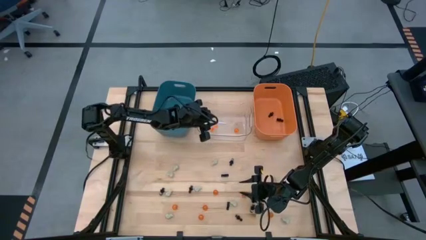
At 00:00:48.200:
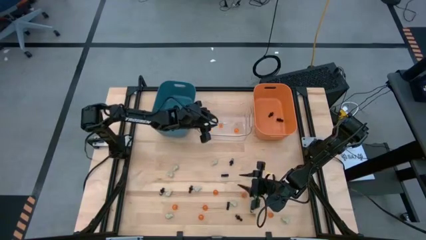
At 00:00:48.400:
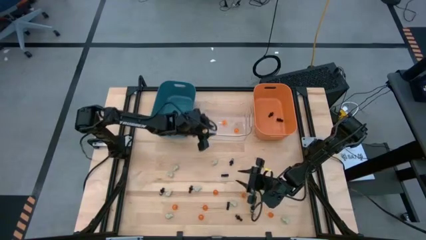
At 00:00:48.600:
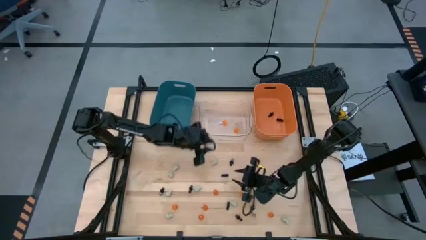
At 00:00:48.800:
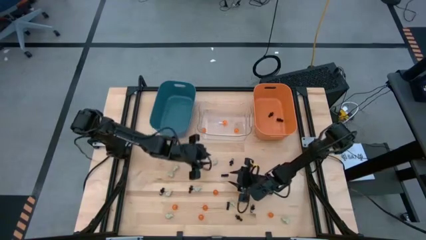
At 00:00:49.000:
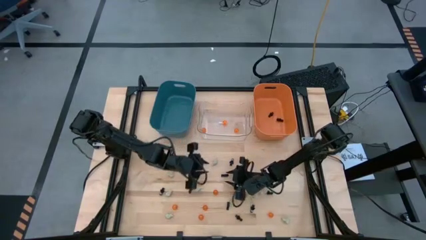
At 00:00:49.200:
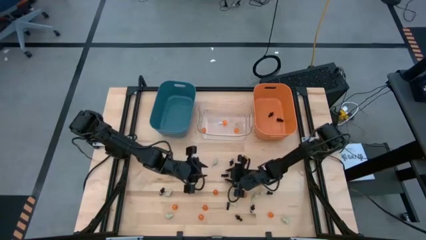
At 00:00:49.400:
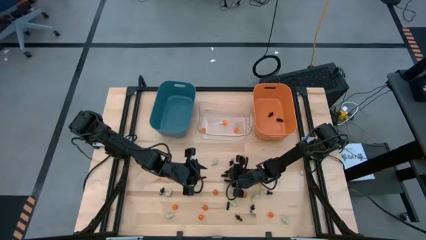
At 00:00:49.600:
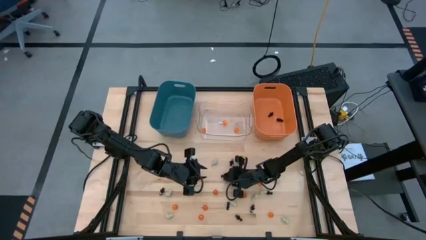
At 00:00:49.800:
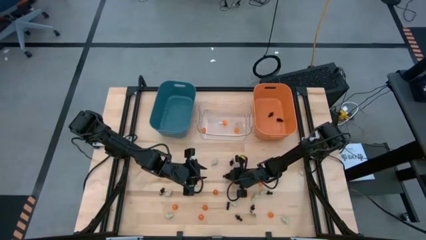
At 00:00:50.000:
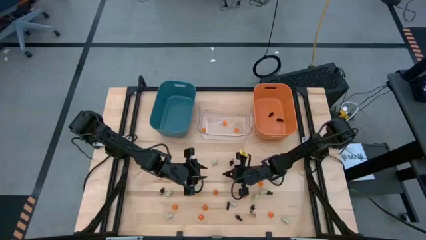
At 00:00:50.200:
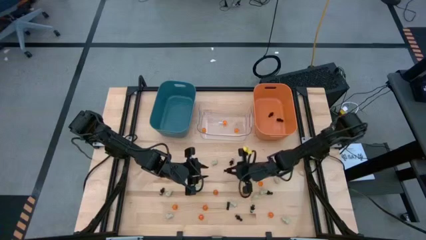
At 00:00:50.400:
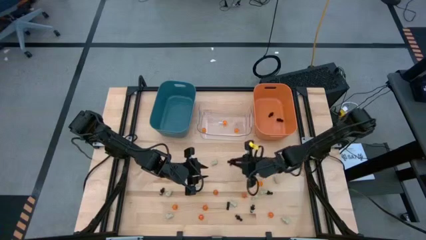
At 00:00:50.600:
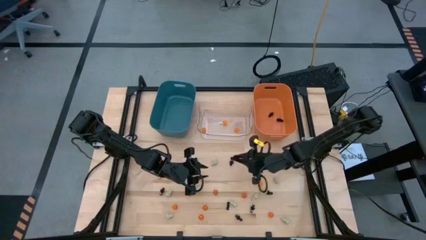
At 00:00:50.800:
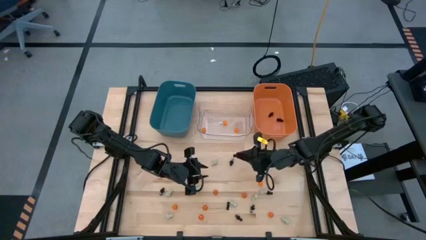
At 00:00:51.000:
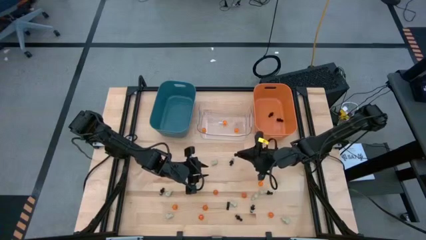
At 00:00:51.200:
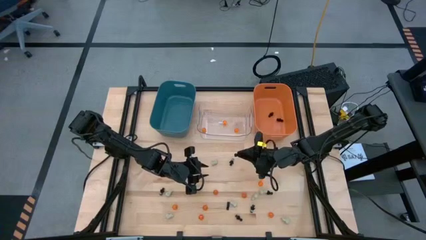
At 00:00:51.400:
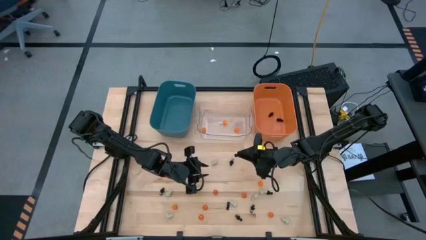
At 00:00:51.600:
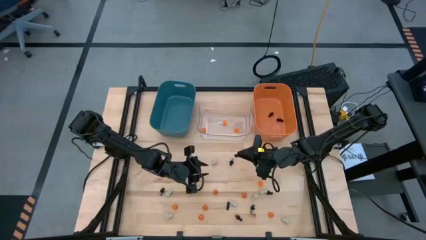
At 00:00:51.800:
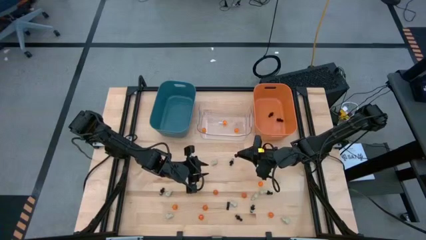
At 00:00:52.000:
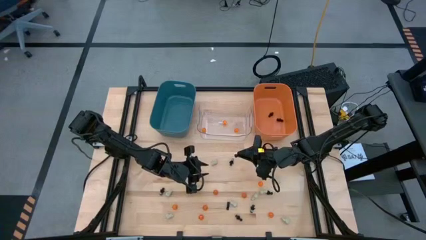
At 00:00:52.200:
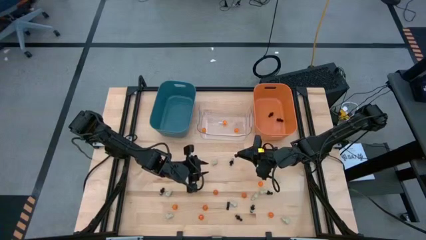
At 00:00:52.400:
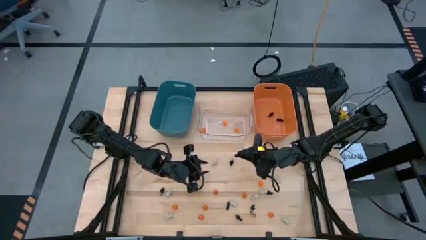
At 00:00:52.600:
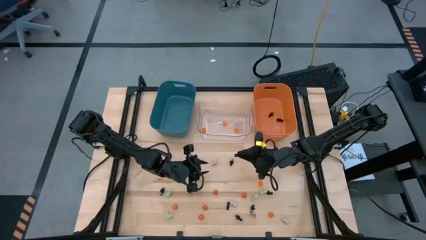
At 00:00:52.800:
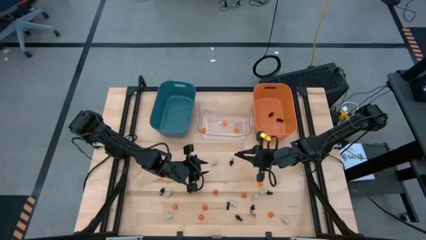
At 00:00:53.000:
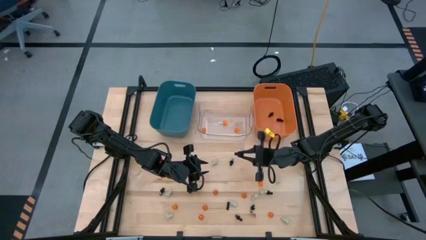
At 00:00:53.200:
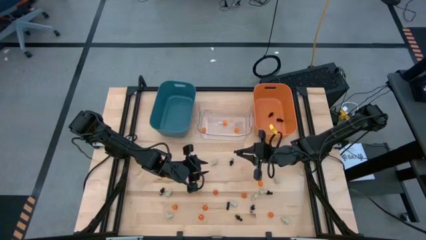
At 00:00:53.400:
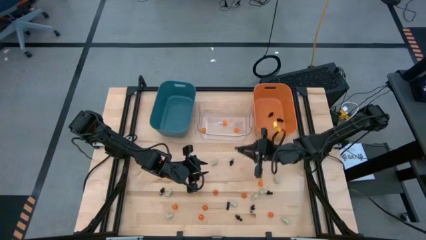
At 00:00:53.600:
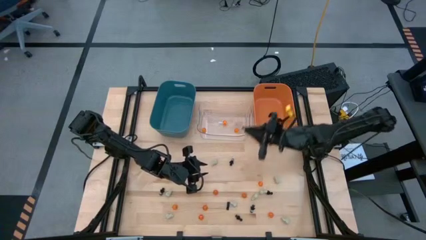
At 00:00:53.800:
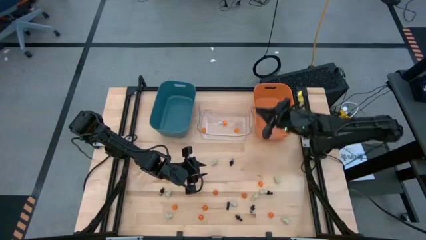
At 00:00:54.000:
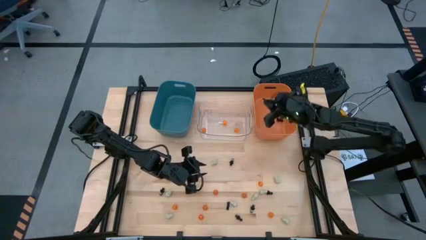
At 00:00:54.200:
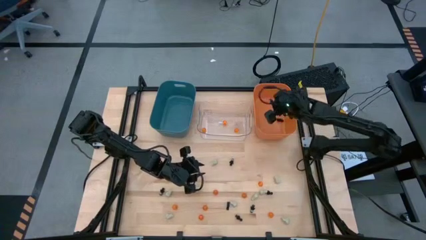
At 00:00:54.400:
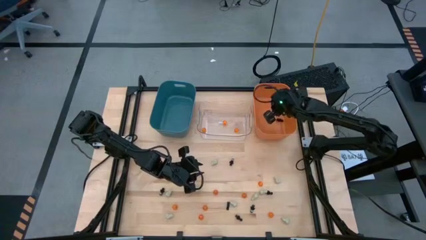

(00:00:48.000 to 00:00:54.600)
Task: Sort Halloween decoration
Put the black skeleton toy into the orange bin

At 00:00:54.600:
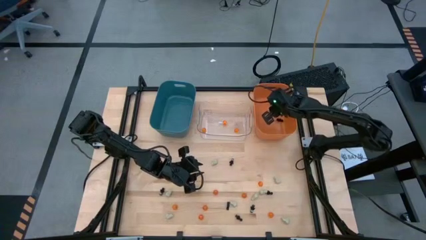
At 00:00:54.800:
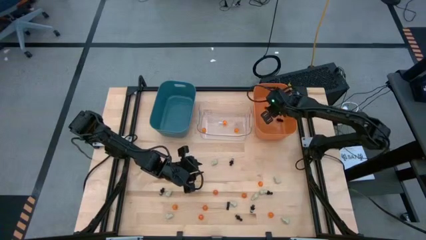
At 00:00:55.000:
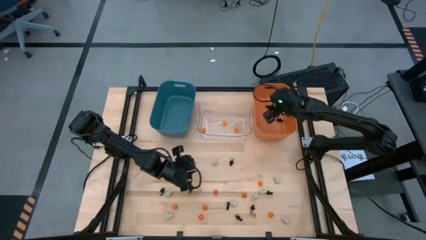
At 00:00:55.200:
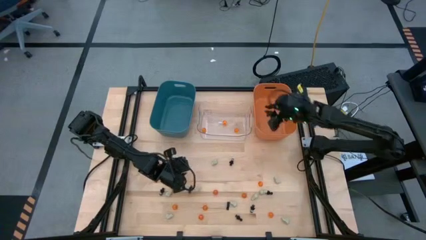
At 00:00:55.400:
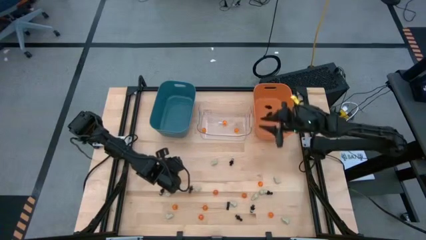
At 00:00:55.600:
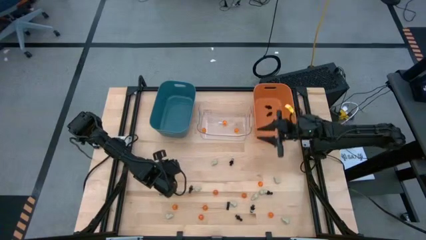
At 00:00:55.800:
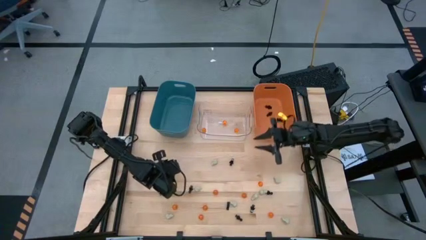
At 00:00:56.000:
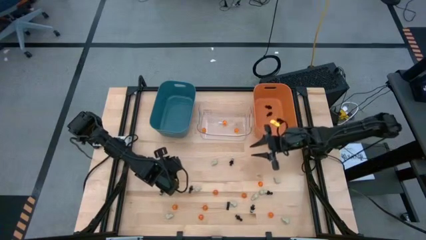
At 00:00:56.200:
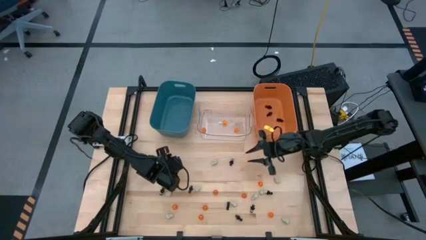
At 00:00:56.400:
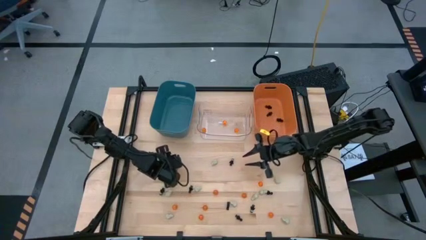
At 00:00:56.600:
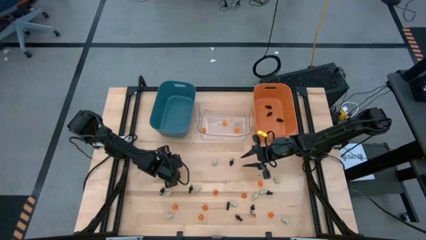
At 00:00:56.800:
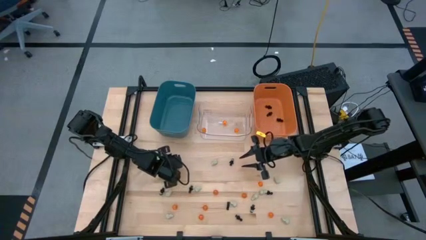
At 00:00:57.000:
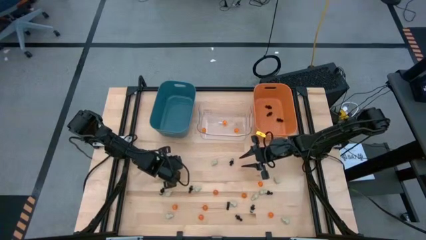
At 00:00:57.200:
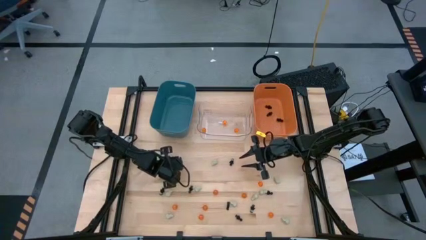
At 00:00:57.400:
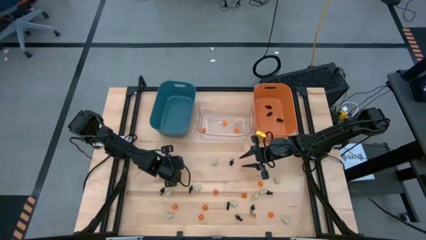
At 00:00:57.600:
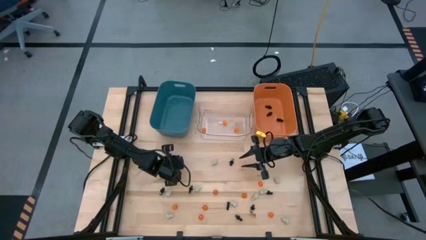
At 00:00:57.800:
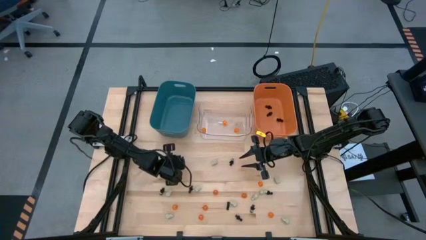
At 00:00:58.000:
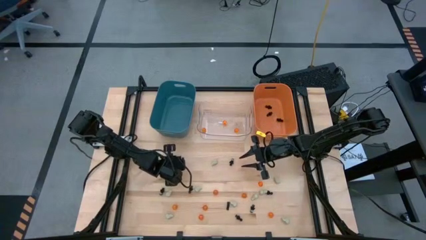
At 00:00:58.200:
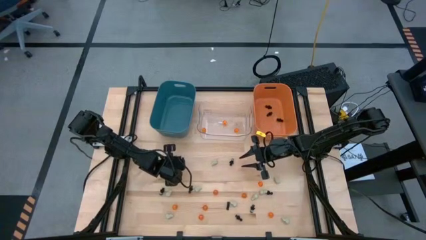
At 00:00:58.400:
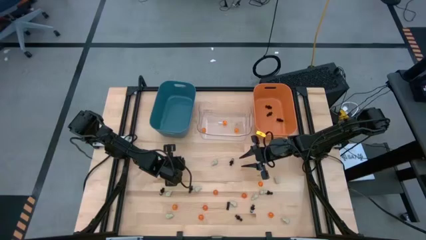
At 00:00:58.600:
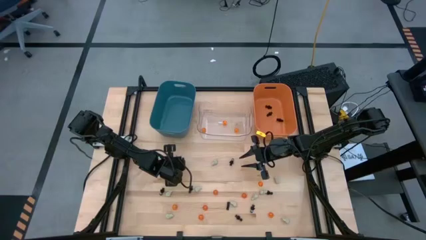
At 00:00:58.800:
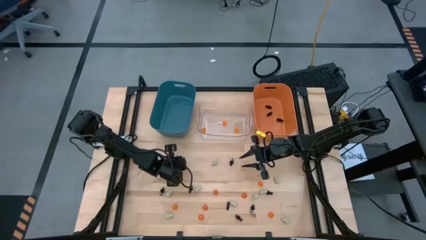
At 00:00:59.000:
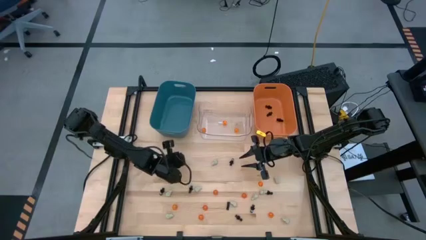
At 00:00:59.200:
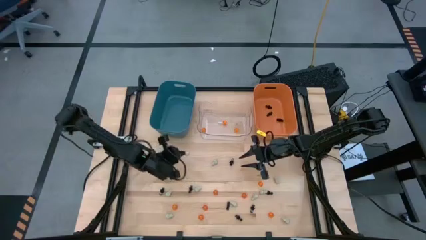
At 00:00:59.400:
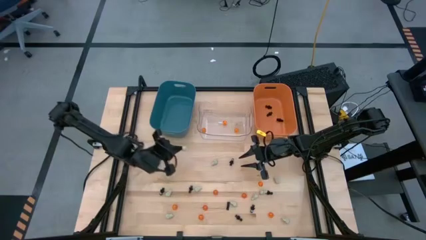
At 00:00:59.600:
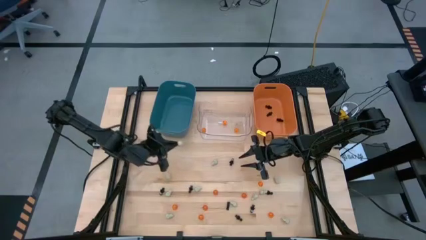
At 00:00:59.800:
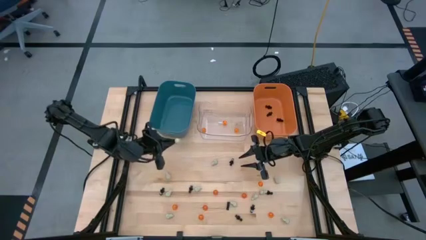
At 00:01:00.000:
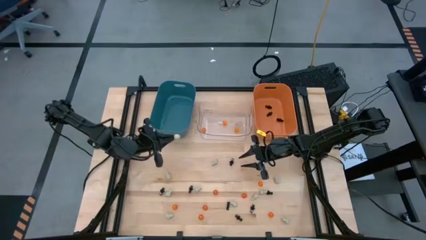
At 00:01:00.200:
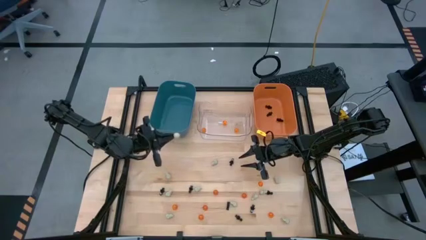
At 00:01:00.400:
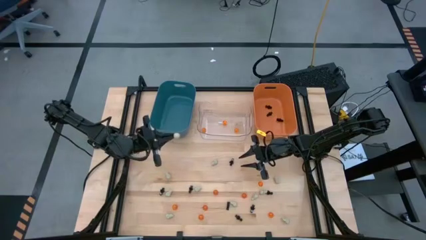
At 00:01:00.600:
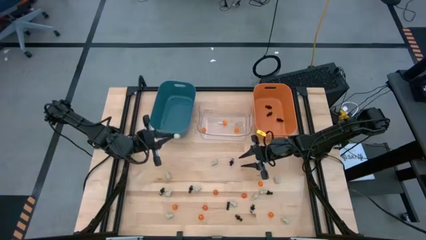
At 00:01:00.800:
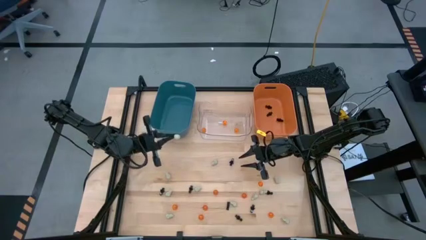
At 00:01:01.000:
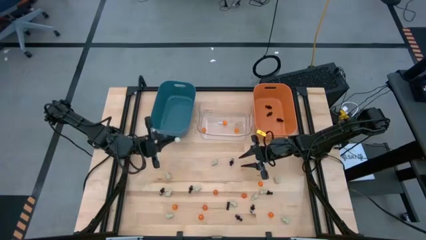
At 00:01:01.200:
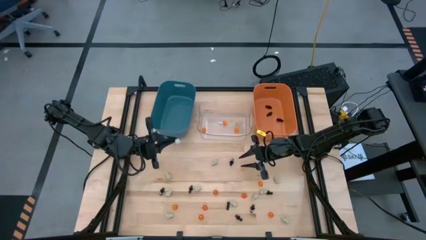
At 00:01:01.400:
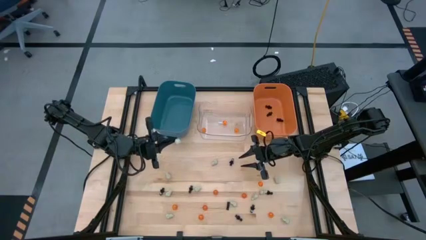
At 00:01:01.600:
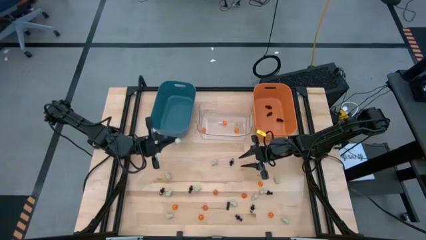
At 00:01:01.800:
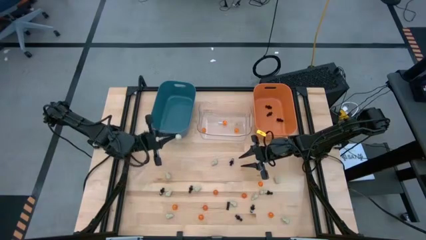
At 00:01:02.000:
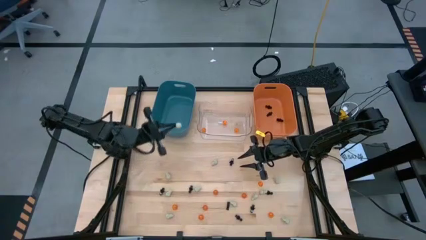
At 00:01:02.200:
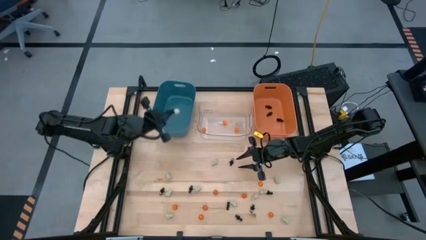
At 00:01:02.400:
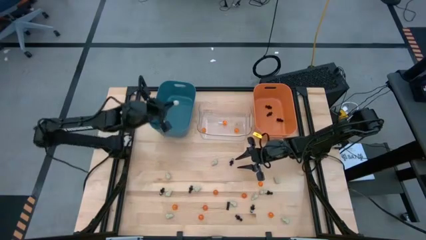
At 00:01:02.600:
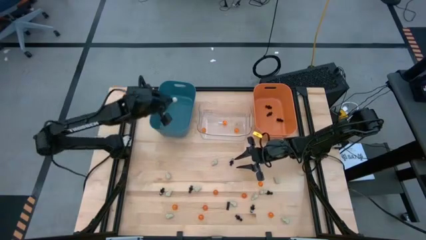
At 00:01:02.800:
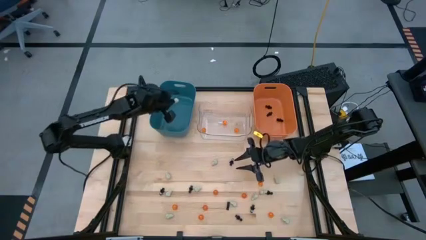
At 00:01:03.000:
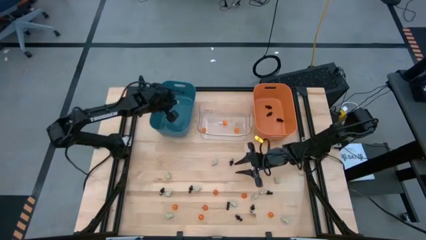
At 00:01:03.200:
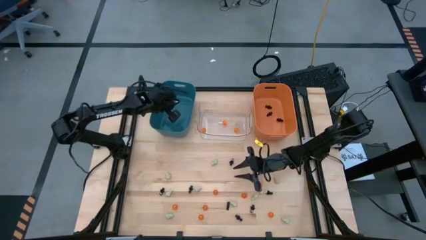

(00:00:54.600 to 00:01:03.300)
Put the white skull toy into the blue bin

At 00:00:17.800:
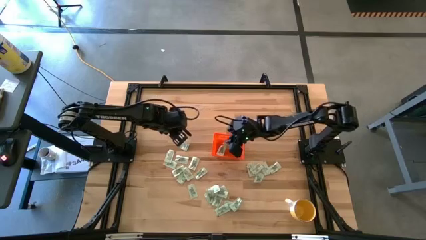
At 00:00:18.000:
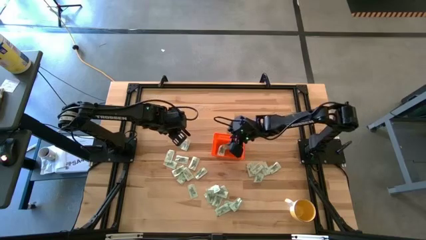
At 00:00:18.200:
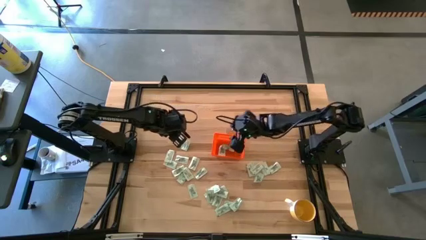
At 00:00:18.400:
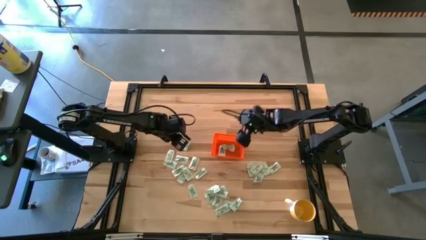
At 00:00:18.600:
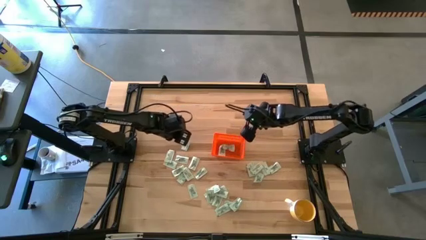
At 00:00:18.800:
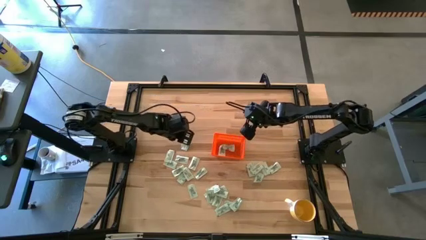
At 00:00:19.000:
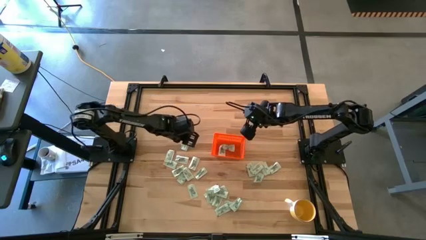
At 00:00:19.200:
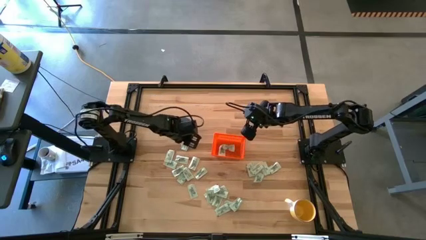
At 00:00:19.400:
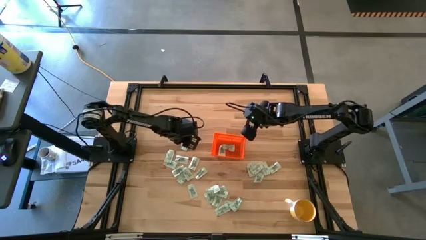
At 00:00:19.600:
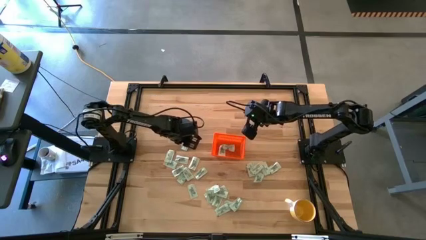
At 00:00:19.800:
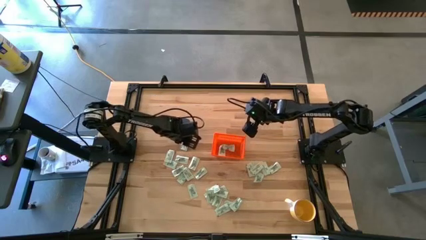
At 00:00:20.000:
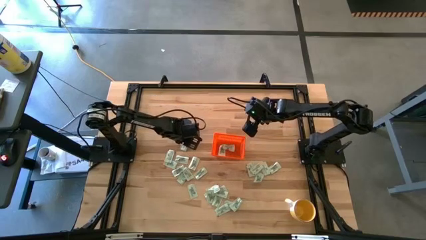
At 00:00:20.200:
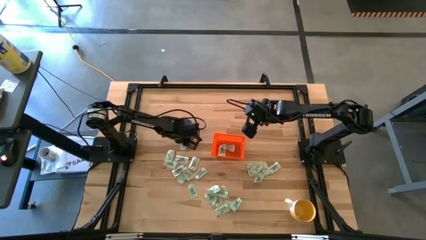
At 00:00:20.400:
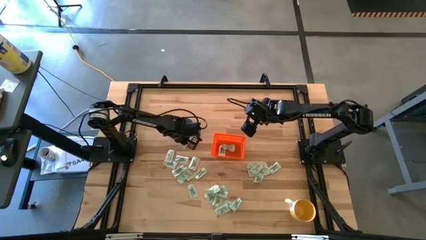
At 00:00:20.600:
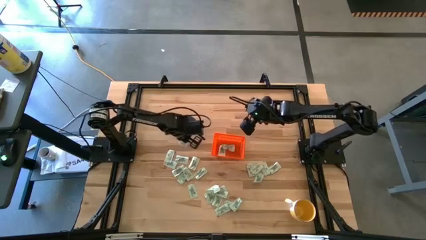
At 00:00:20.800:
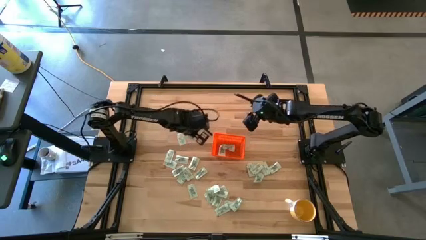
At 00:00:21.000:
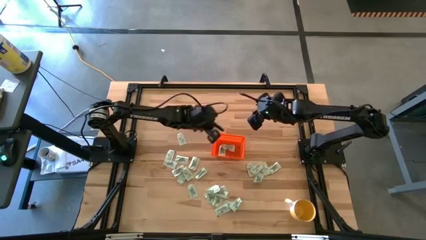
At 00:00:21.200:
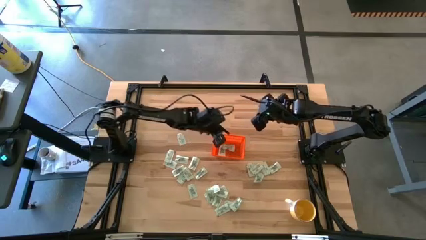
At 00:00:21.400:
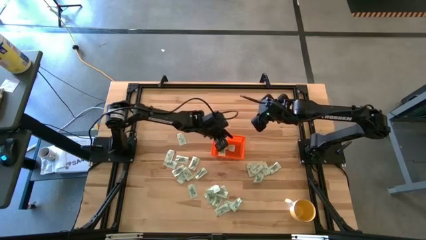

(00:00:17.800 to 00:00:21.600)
Task: Pick and place Stevia / Truvia into bins
Put the white stevia packet into the orange bin
